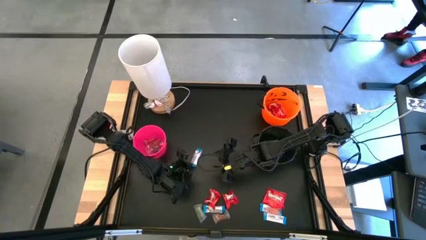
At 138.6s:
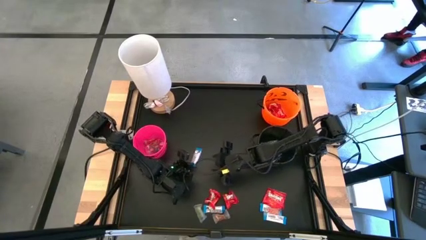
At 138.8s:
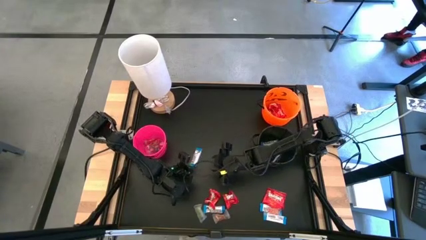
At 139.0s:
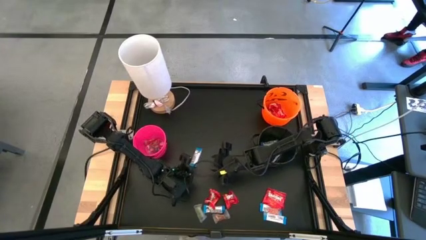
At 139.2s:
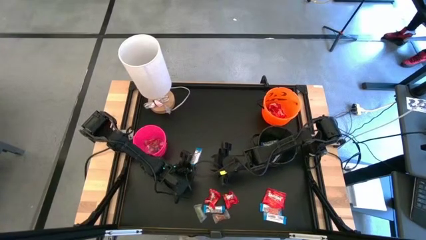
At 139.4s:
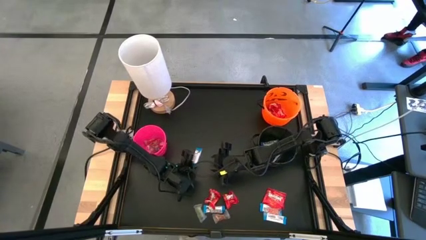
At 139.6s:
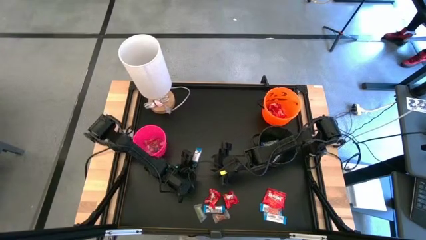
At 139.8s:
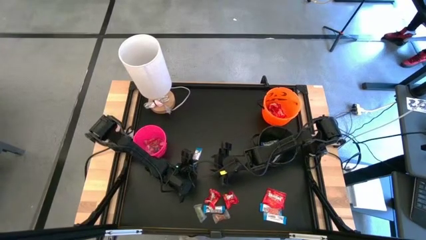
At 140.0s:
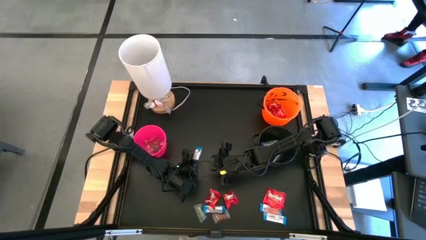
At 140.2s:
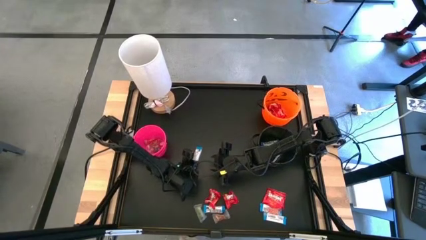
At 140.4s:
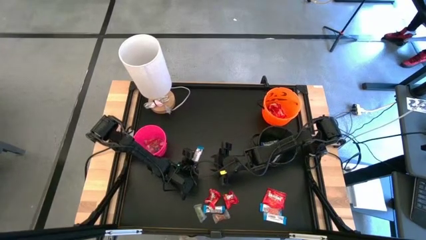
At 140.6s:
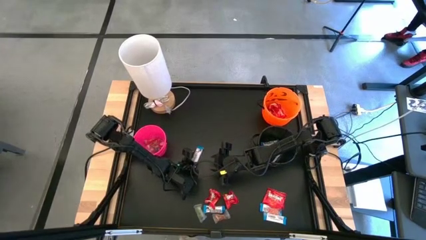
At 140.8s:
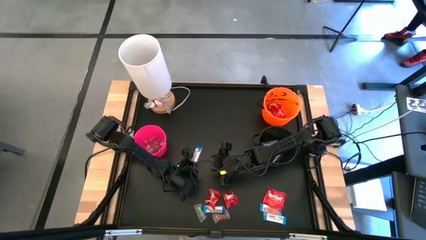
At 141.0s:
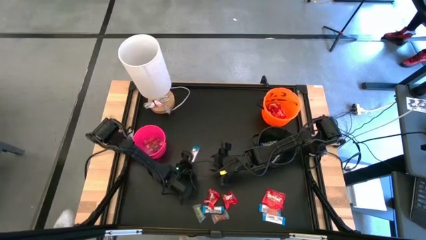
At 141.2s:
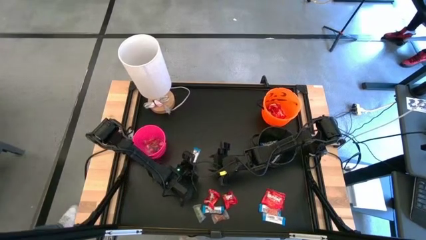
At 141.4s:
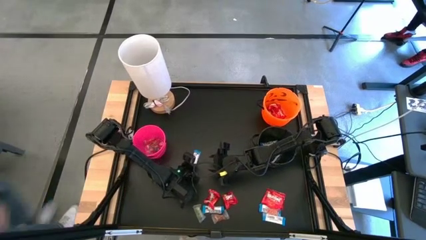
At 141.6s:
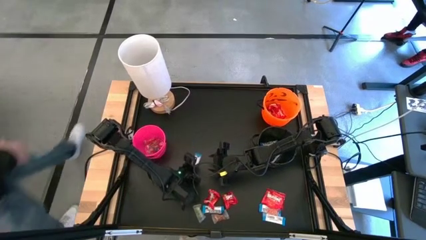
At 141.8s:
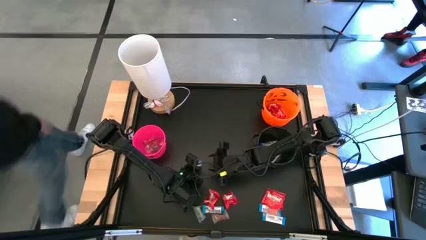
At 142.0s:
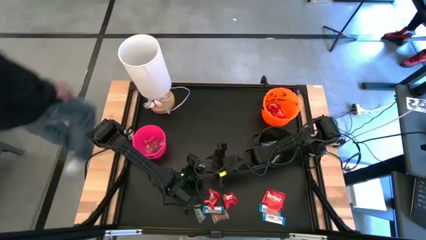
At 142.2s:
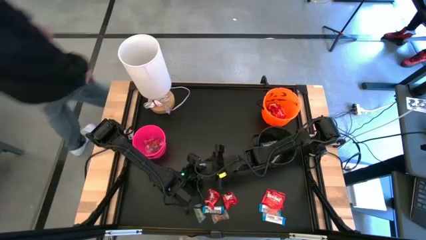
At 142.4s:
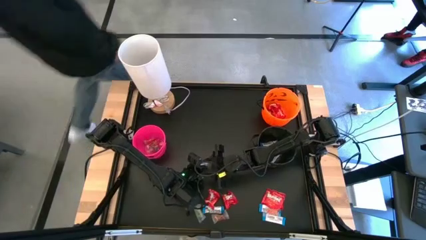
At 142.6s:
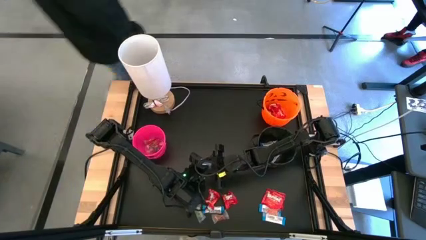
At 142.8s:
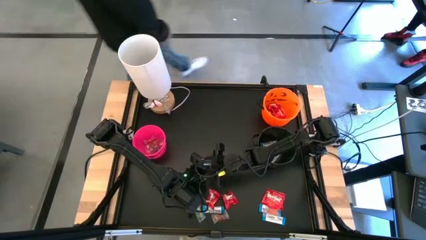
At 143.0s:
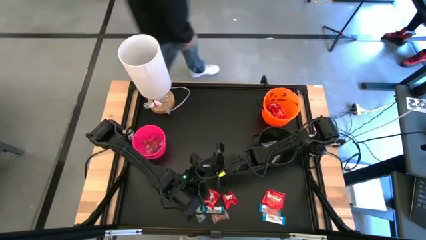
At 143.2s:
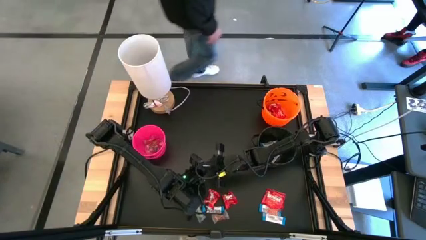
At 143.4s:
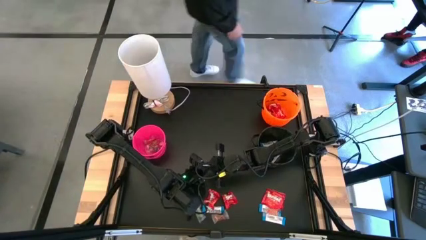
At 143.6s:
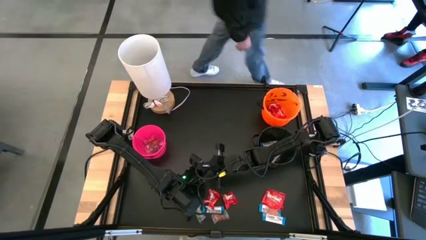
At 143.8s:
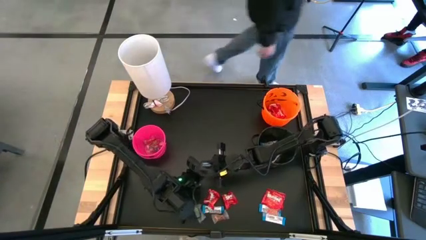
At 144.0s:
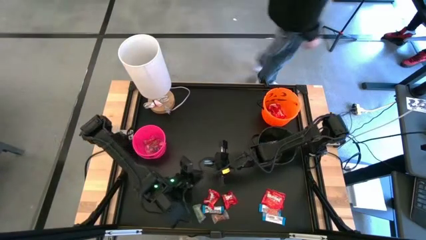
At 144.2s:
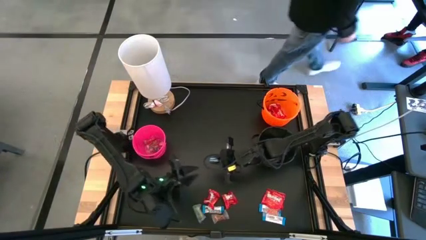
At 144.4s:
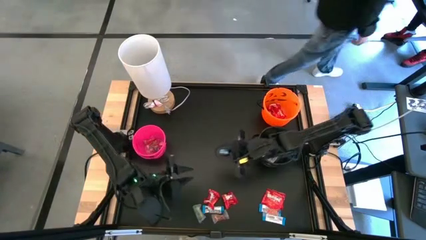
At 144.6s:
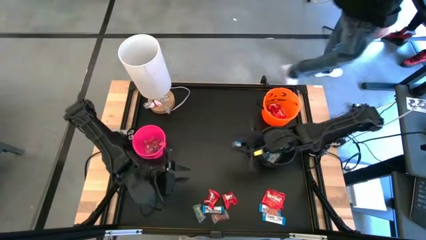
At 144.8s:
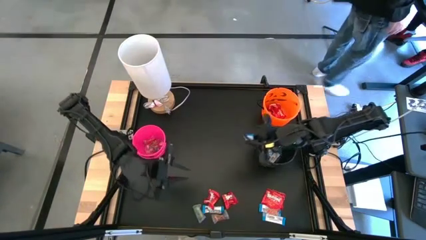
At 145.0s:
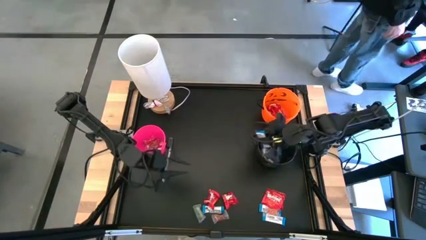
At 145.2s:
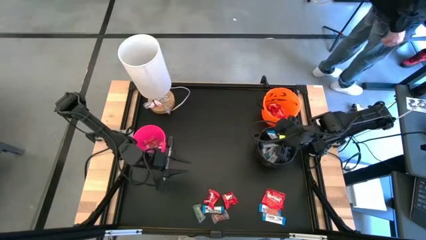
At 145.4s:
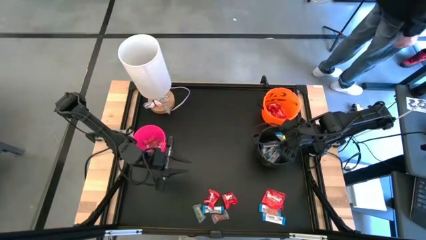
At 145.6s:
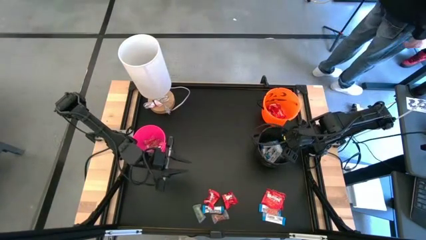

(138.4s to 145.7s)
Task: Sort candy
Put the white chocolate into the black bucket

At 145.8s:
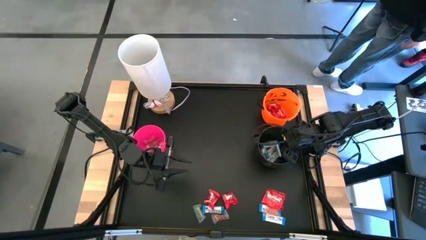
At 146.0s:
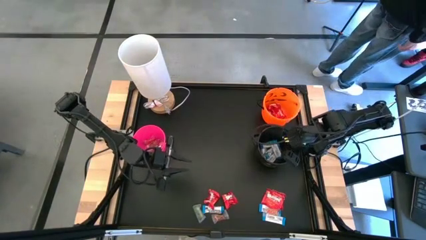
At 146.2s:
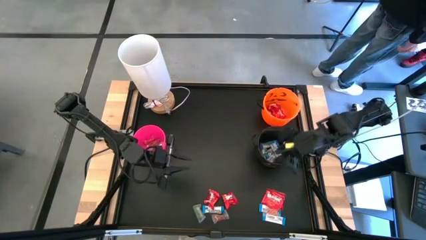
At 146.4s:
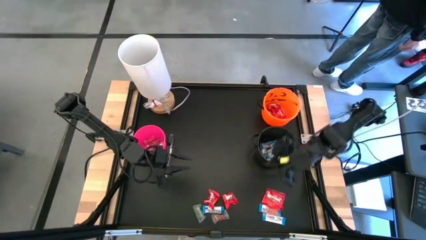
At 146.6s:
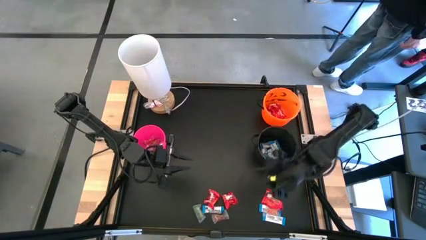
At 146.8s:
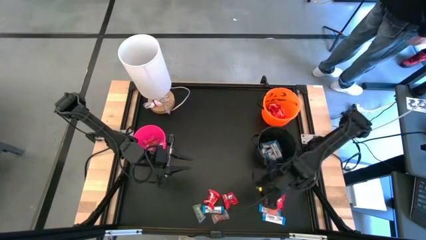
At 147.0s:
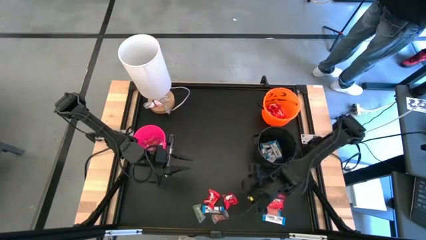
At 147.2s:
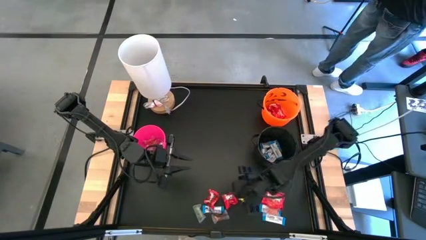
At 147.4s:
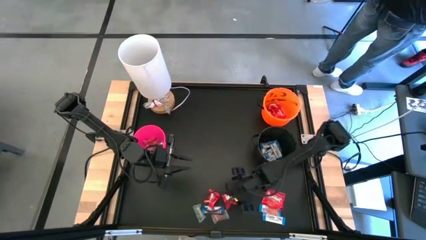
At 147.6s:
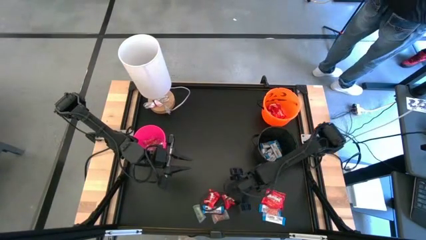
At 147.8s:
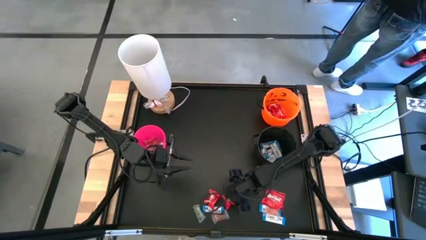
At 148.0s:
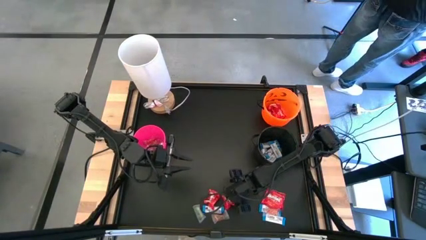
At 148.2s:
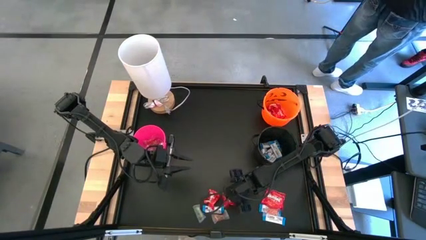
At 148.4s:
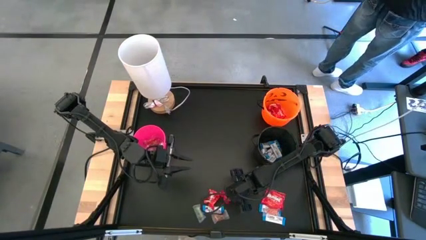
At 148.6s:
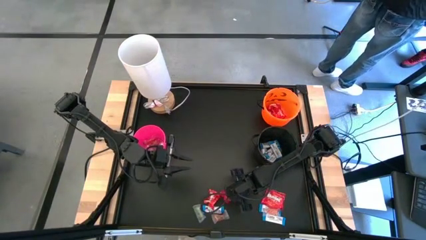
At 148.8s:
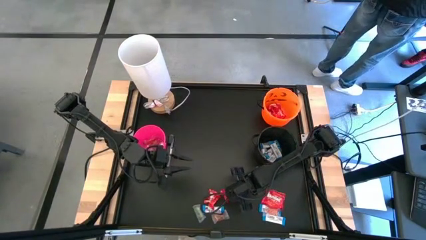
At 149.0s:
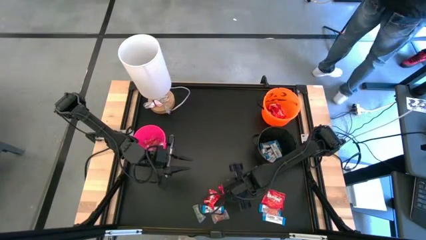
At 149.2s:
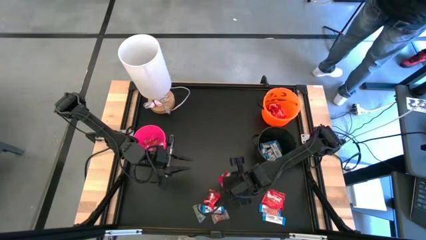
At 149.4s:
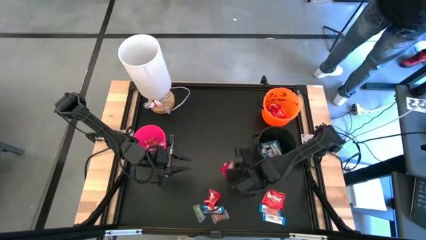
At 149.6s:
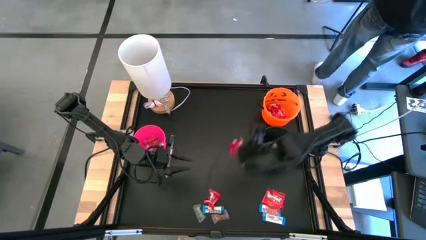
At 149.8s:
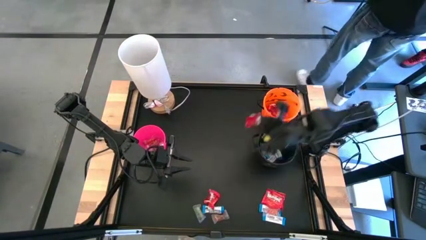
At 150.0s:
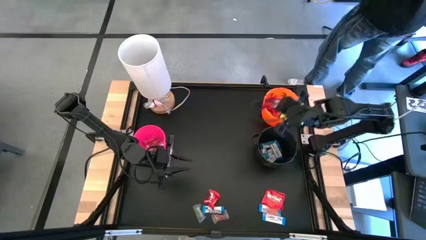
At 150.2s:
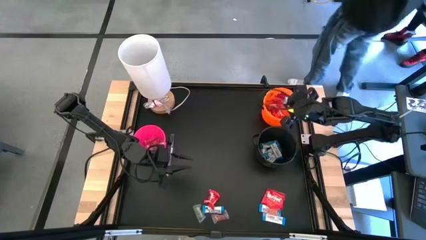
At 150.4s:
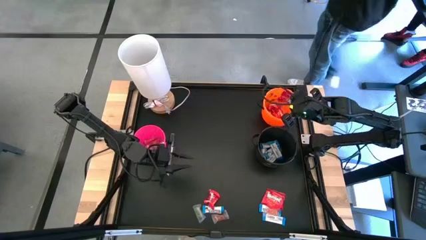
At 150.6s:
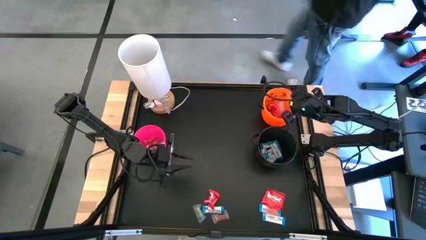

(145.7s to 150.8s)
Put the red candy into the orange bucket

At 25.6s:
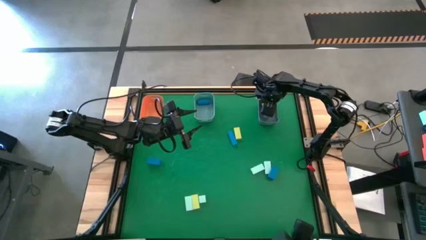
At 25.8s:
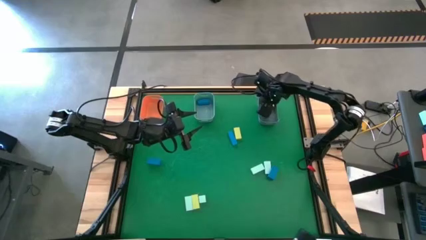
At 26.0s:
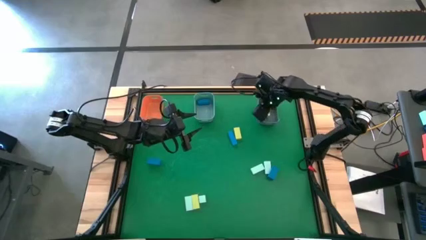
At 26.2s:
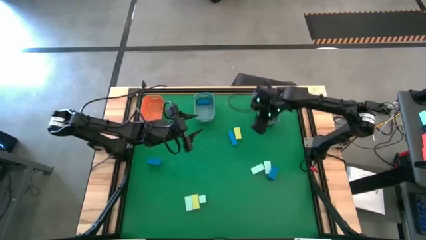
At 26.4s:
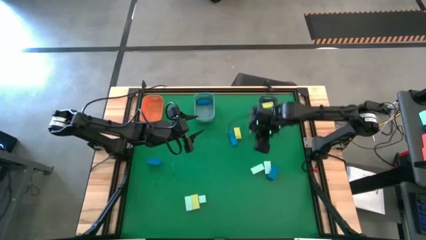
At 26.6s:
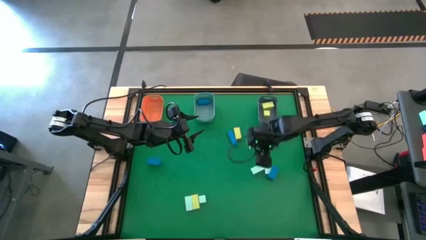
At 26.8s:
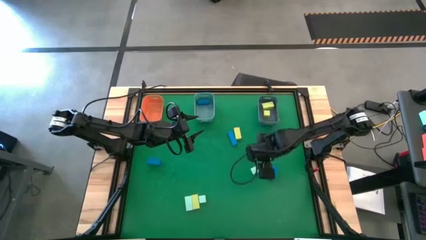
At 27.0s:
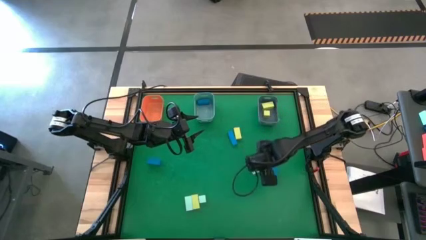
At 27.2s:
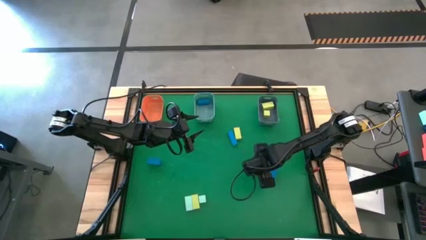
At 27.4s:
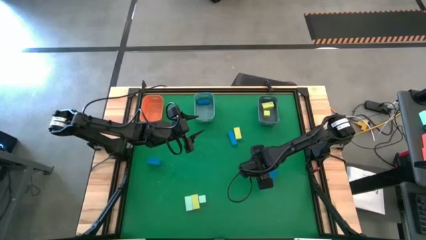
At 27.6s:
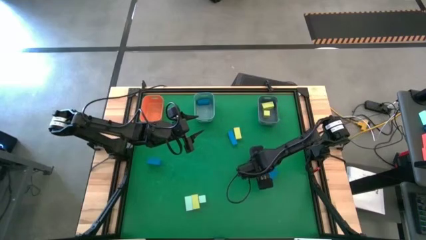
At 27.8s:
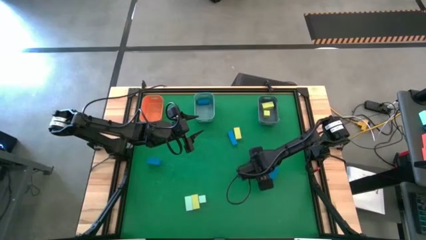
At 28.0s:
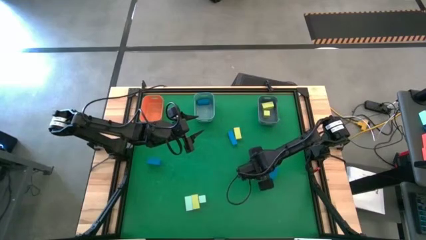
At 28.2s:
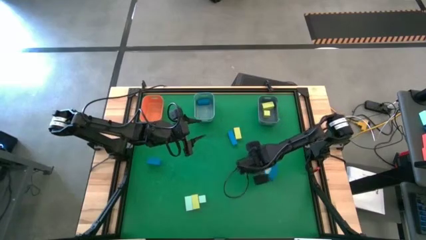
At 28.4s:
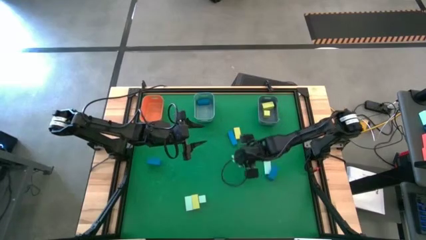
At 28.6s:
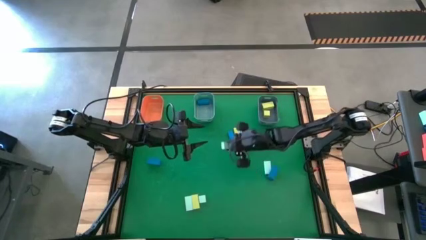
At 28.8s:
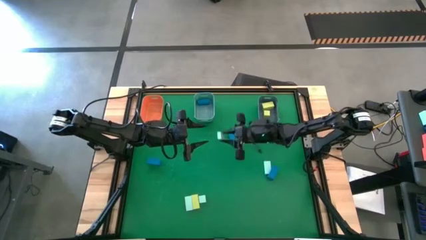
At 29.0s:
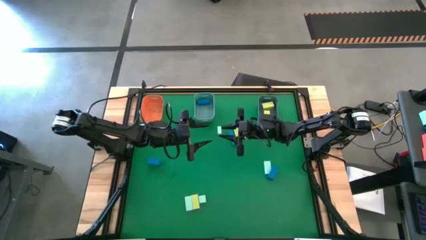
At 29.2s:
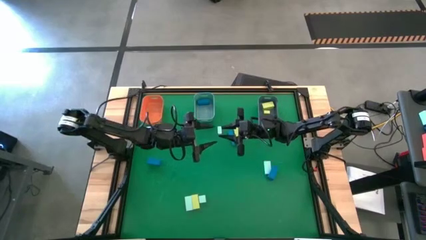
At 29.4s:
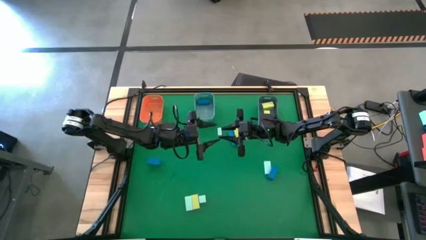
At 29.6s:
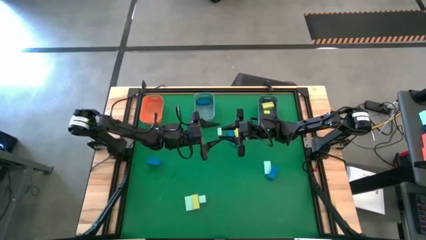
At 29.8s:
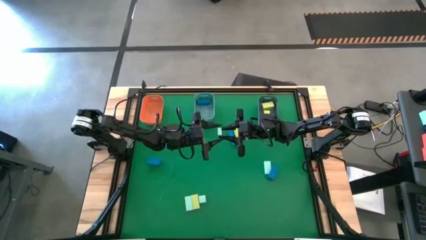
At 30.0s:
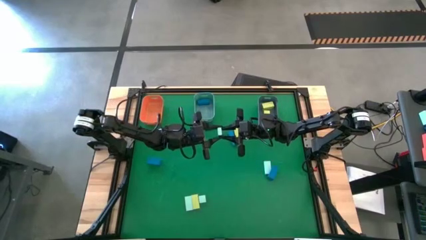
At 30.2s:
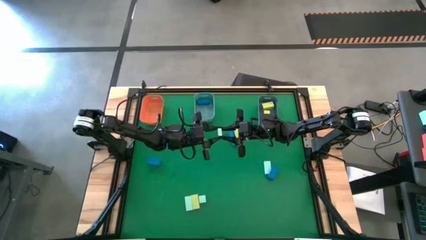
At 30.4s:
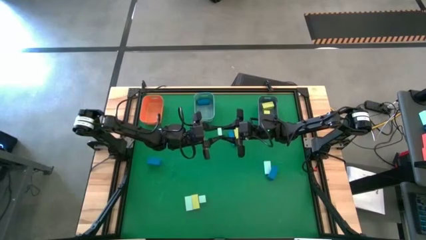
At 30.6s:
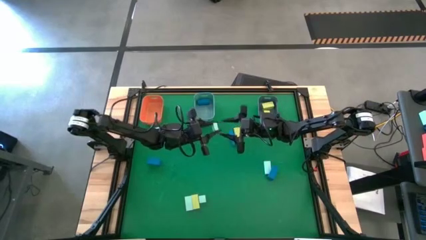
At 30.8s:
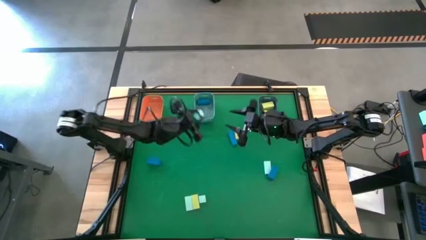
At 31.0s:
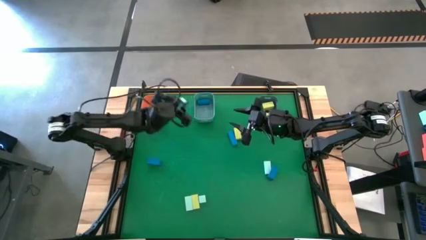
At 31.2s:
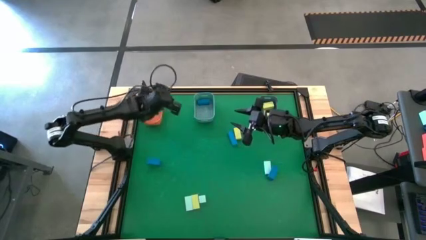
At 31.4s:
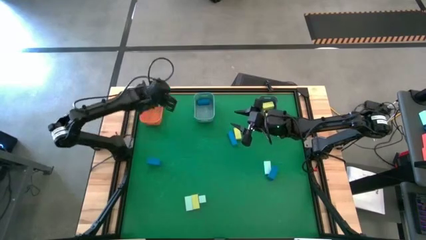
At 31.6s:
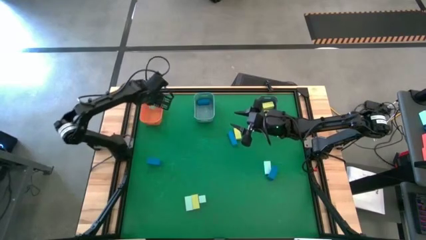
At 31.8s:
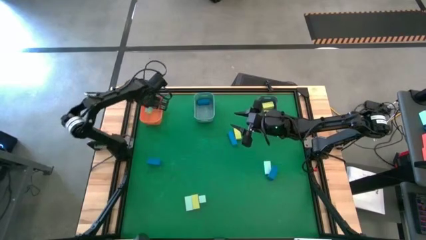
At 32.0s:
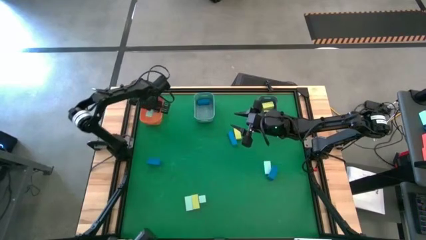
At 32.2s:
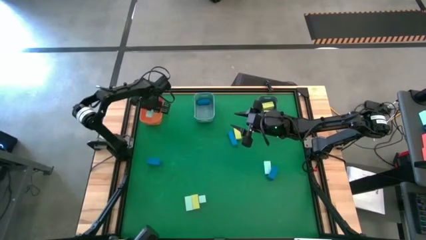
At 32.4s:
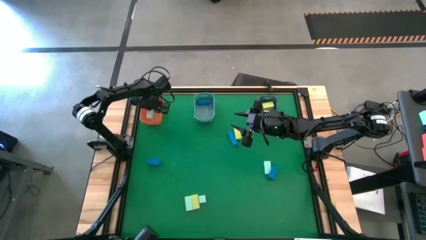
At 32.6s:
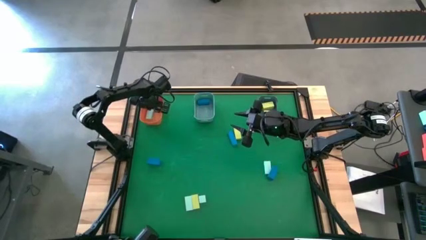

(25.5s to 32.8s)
Task: Sort & place blocks by color
Put the blue block into the orange bin
